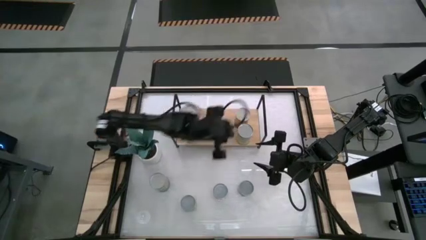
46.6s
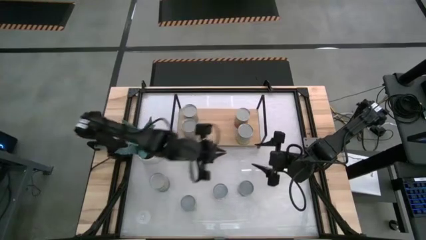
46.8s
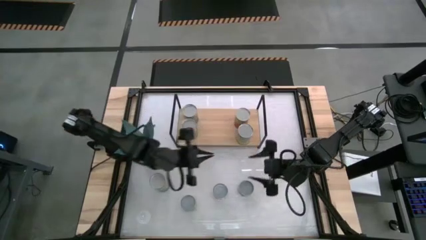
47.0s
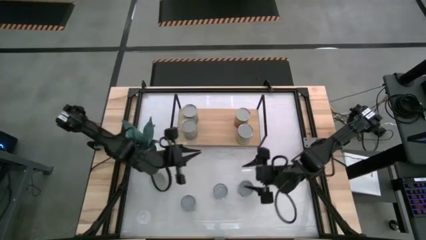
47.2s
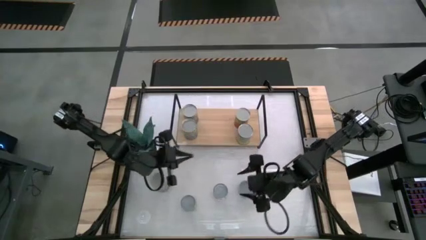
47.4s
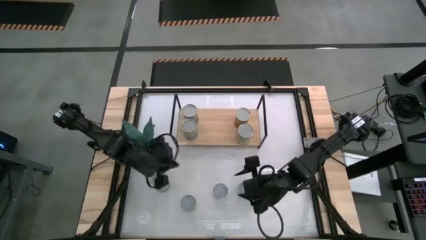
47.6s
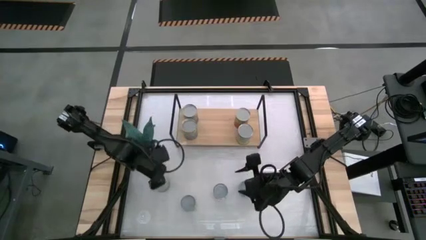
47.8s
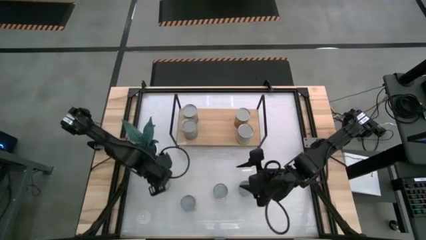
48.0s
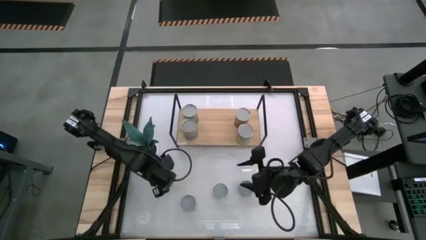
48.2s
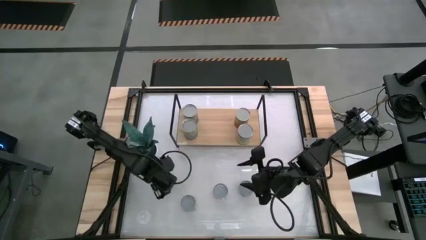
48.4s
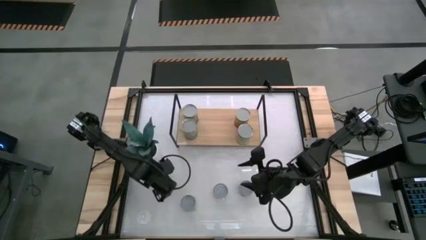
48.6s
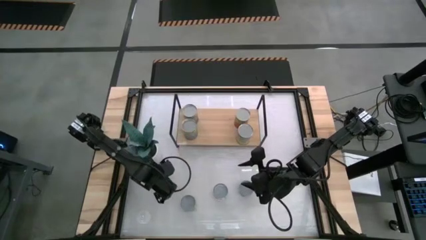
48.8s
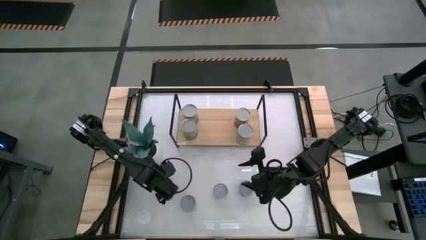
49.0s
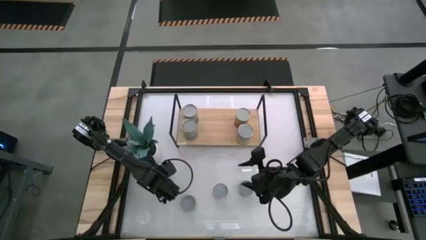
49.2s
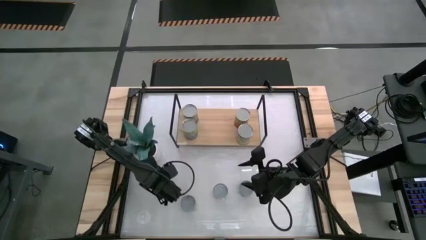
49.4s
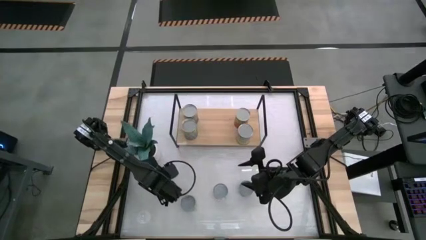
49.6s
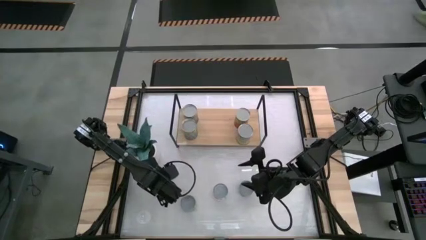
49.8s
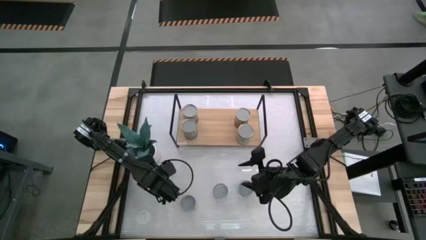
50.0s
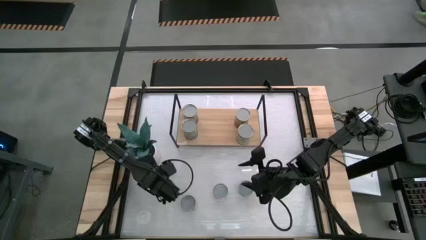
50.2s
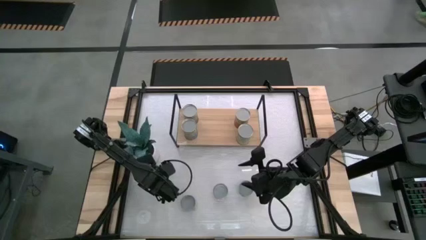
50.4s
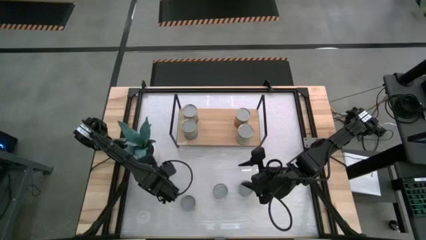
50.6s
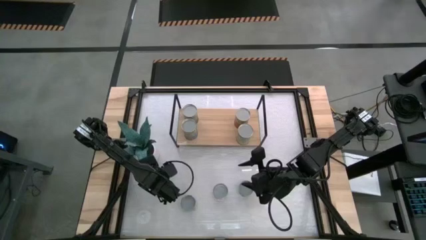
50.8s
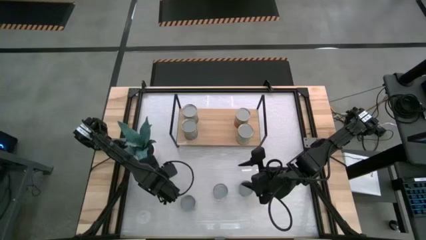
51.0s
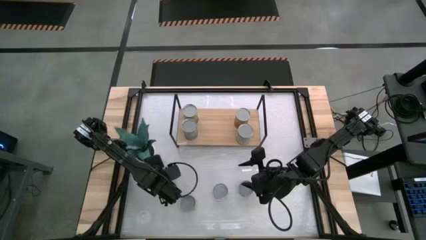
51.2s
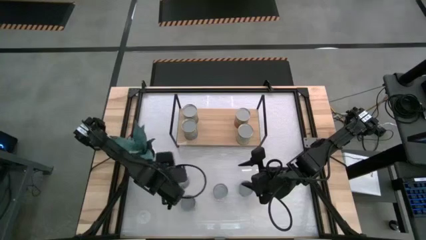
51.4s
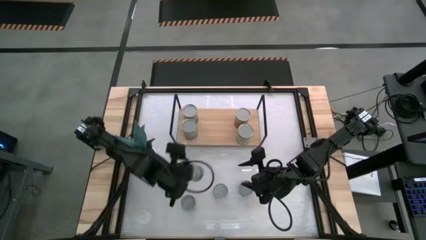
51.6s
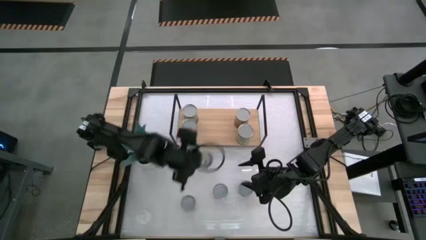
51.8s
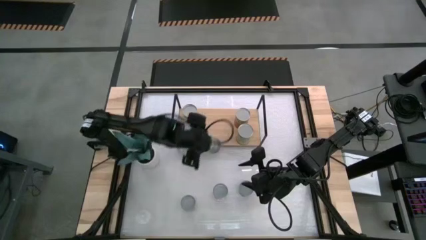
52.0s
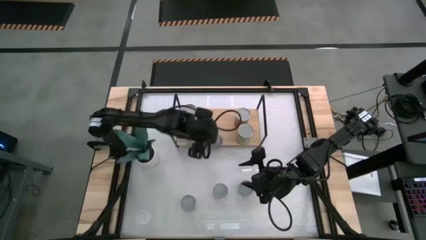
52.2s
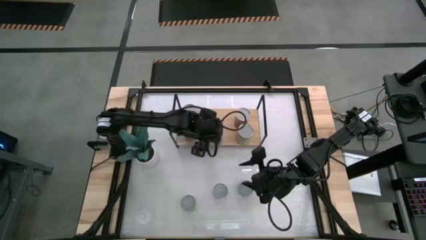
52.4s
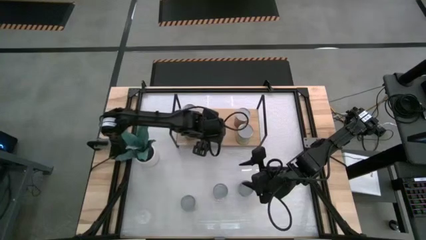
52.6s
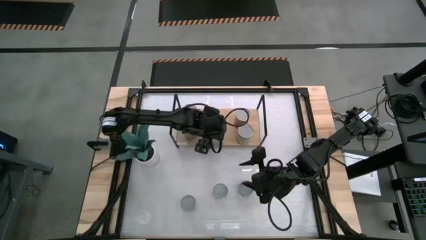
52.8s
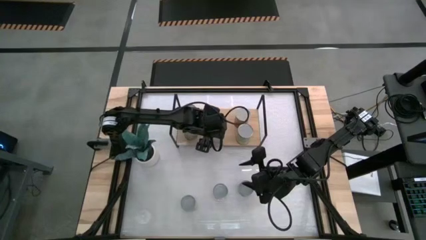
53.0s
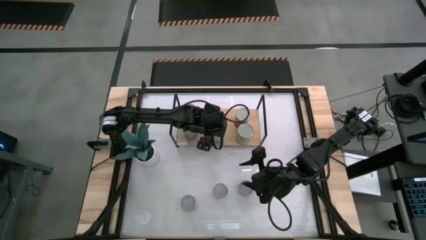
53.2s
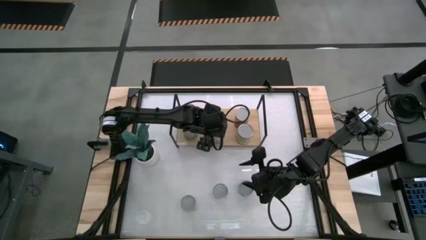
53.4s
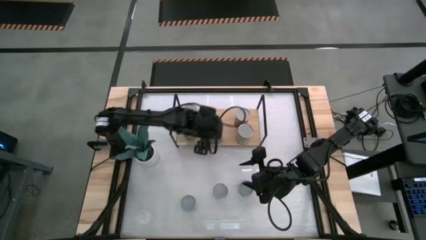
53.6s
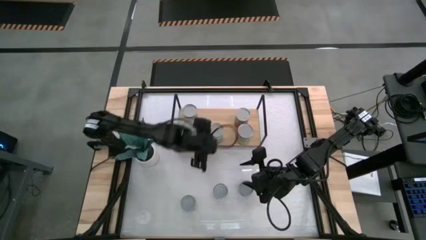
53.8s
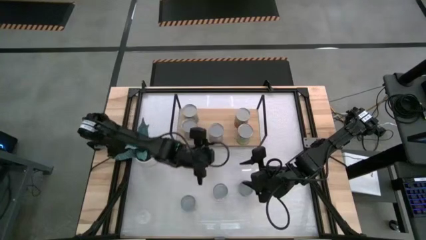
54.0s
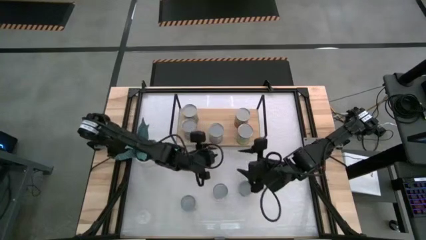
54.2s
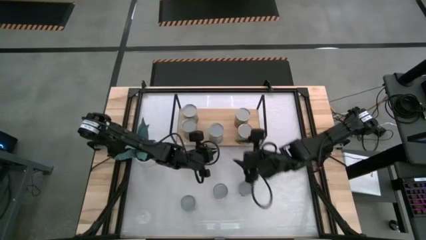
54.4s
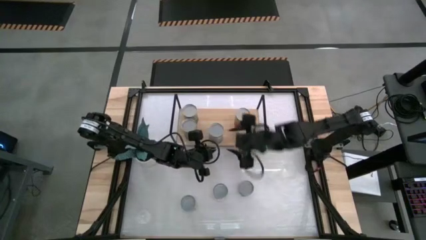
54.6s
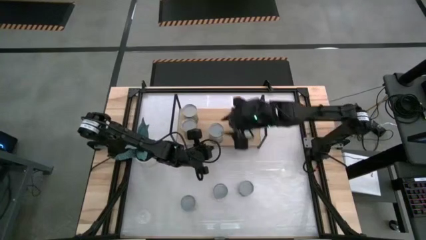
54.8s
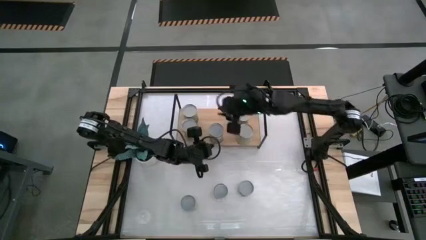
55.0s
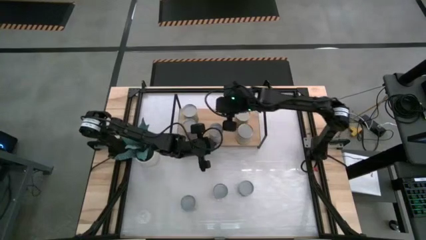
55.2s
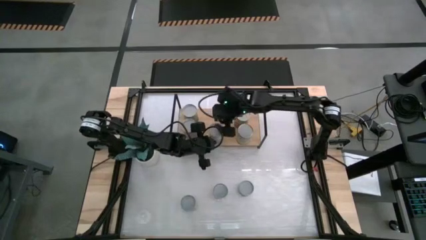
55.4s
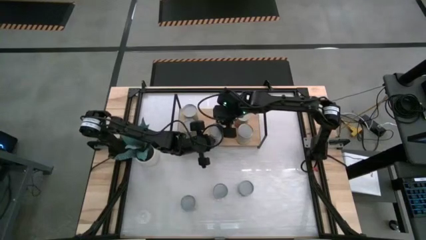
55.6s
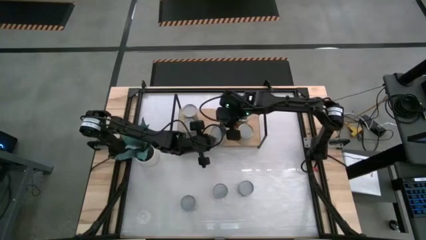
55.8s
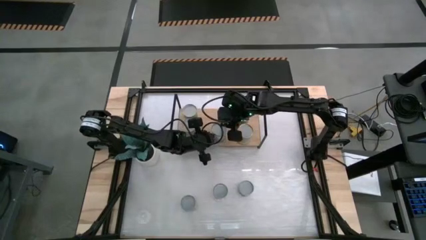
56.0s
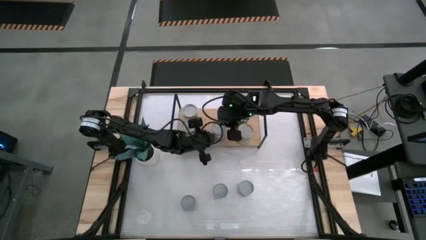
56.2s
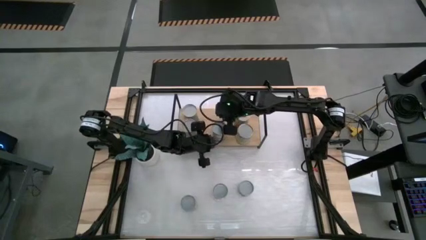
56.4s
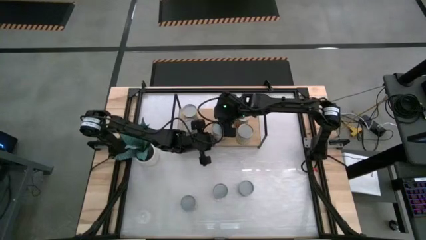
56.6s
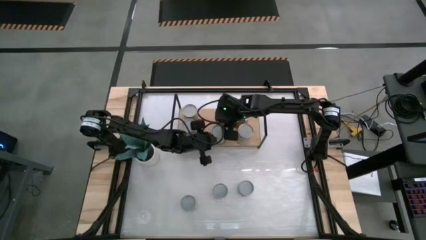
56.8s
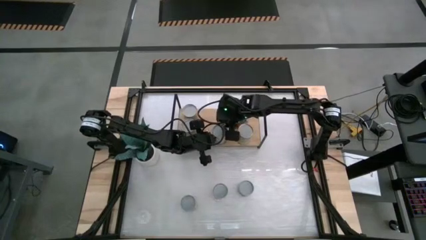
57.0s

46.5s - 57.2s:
Task: Pick and place cans onto a shelf
Put the large canned peas on the shelf

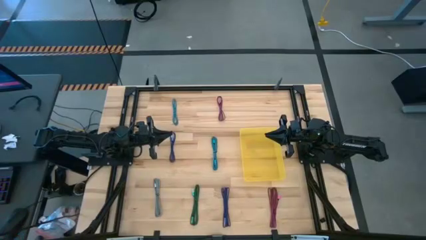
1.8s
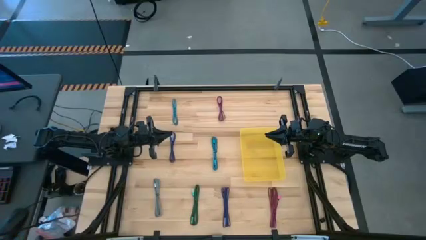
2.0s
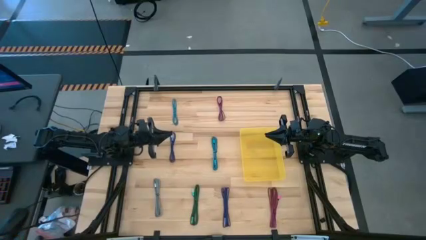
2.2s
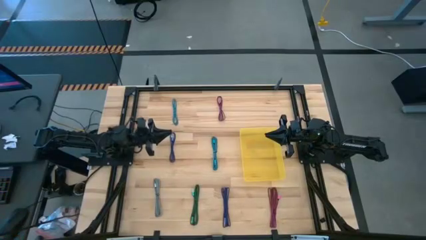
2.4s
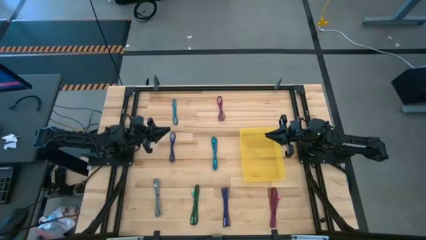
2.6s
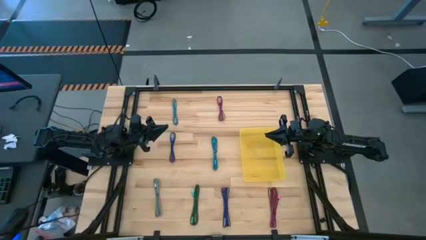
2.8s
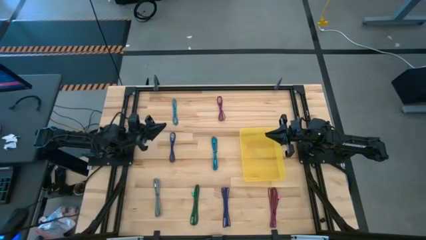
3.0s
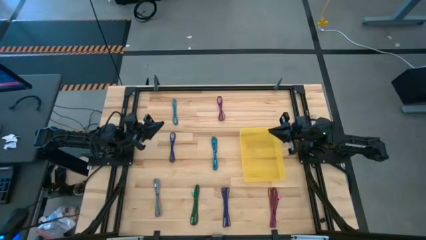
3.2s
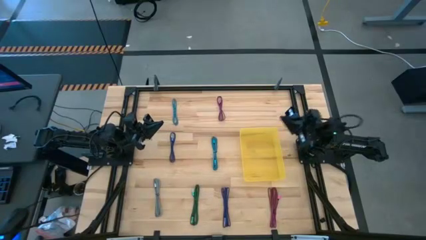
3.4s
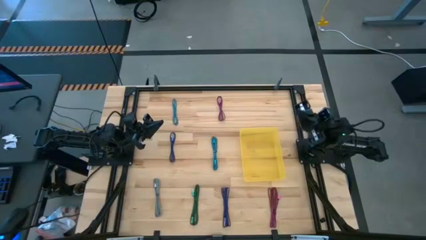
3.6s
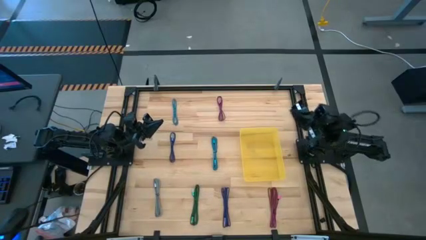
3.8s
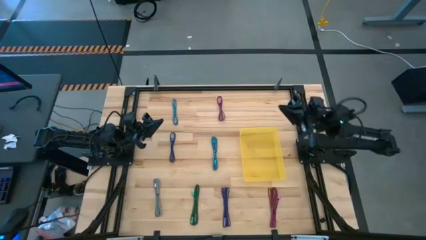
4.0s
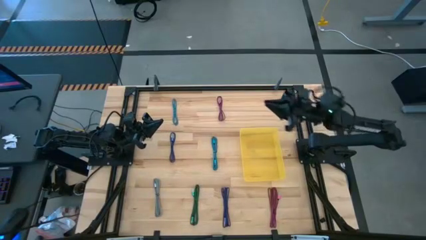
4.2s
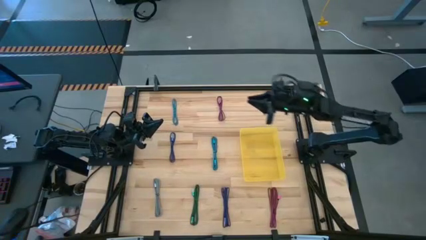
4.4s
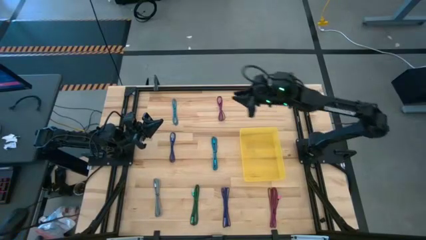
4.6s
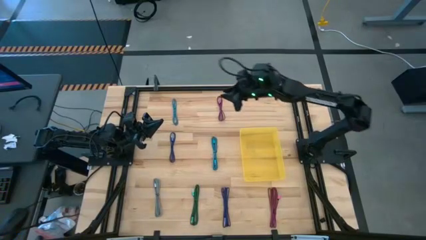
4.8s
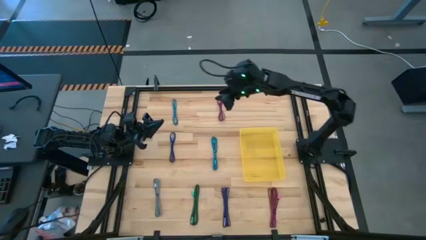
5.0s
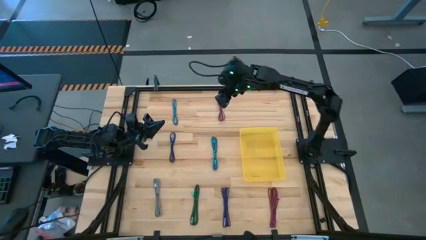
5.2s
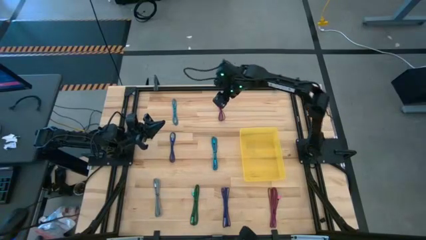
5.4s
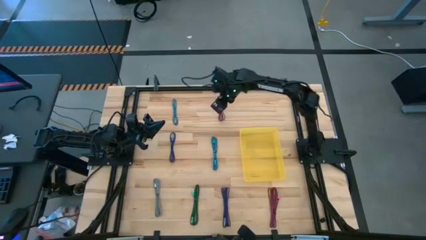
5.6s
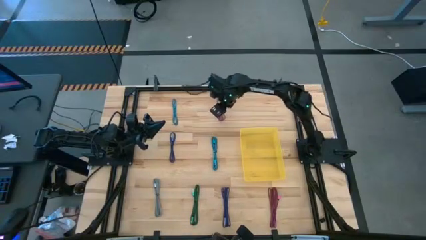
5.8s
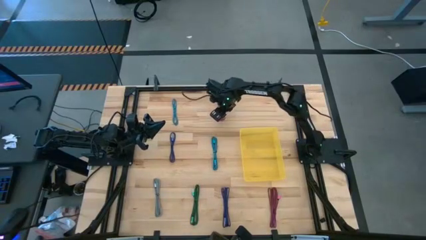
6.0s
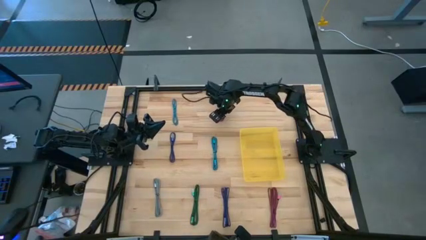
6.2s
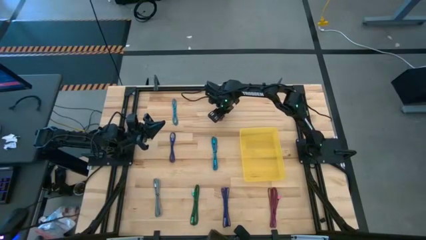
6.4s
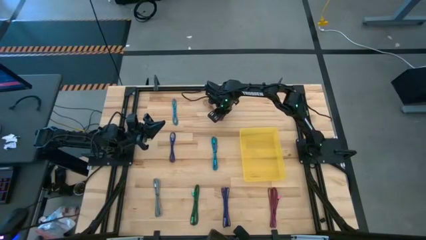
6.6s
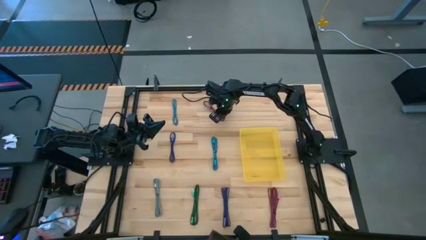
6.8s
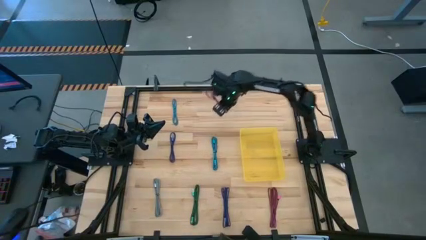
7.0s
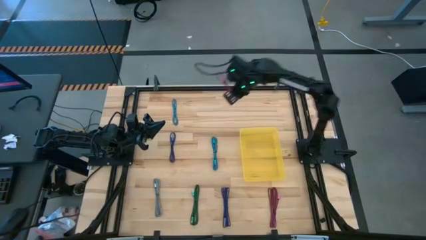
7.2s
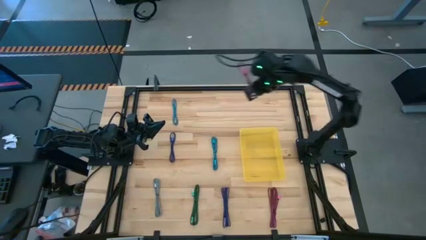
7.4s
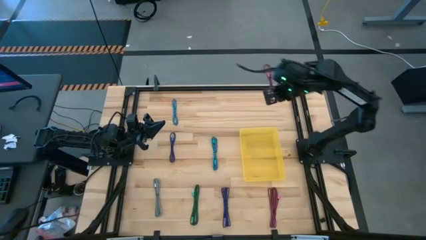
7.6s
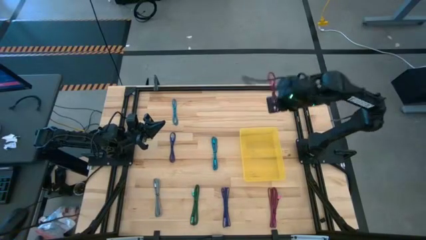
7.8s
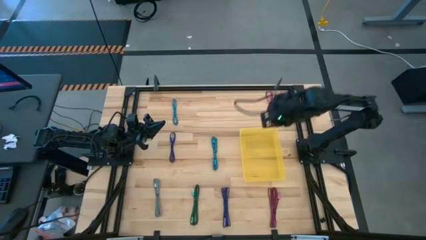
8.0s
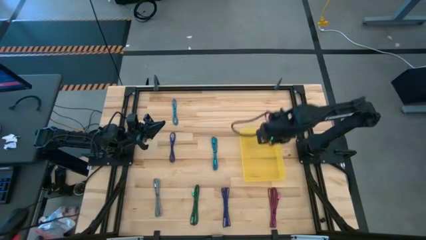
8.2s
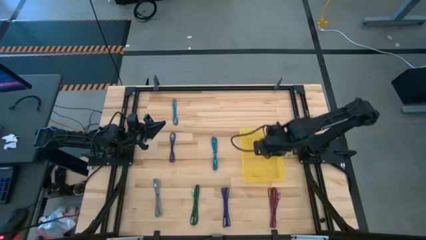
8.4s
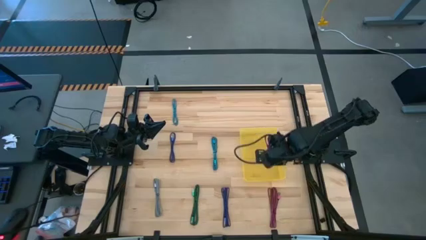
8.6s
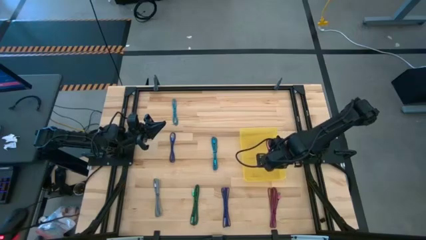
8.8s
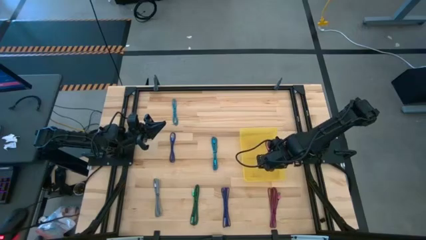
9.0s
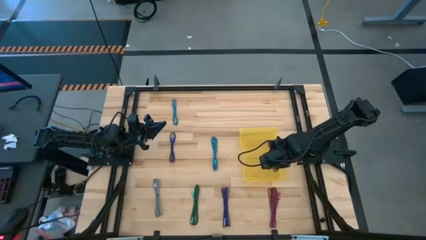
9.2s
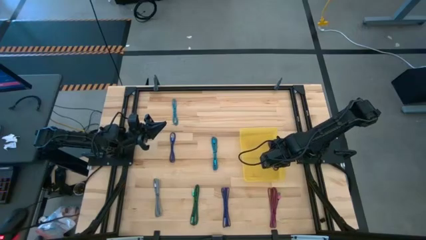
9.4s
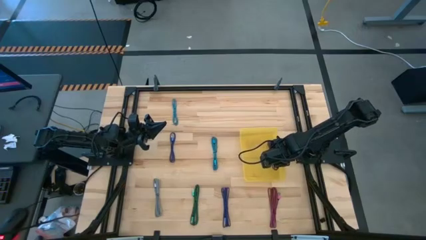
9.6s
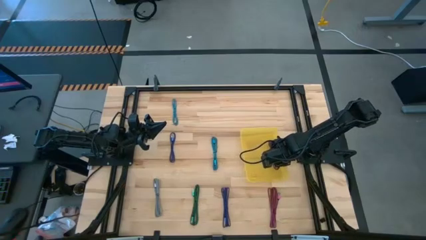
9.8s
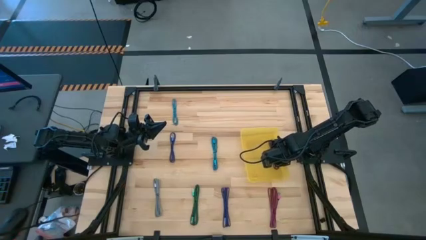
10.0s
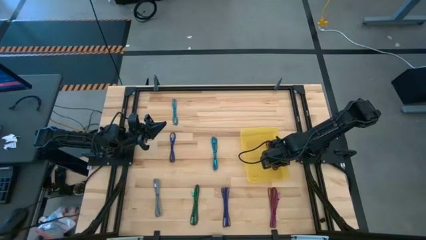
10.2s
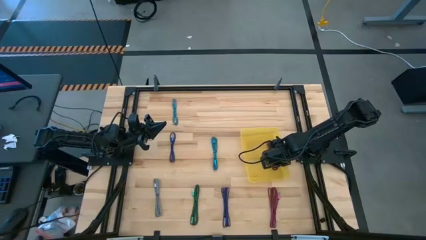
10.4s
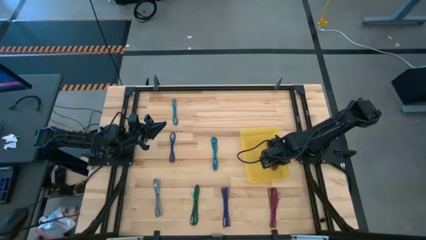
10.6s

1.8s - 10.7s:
Task: Pick and place USB-C Cables
Put the top red charger cable into the yellow bin
